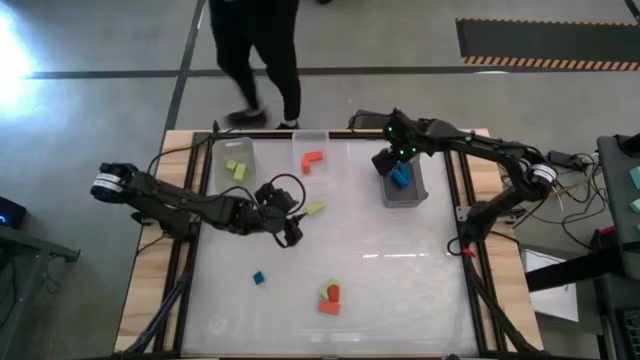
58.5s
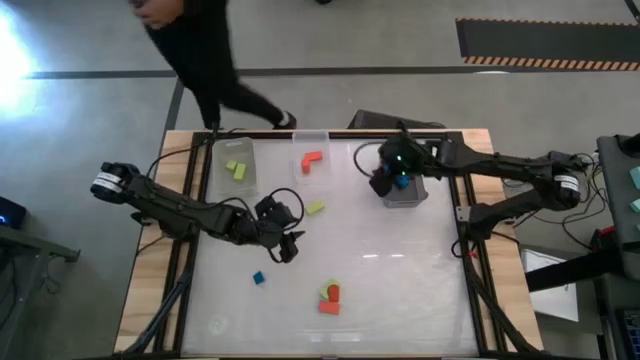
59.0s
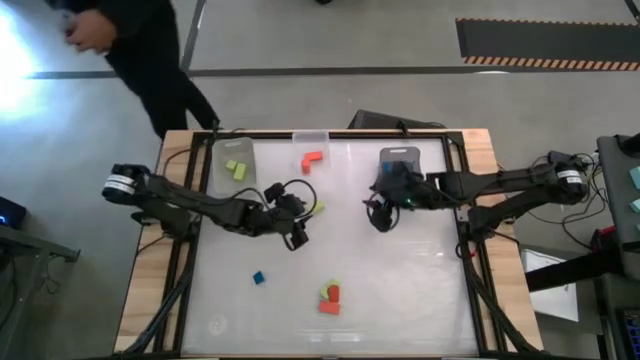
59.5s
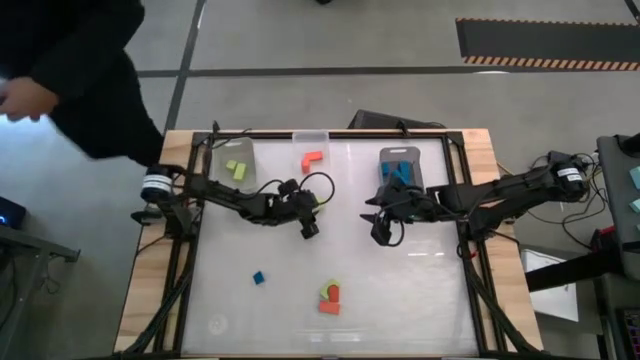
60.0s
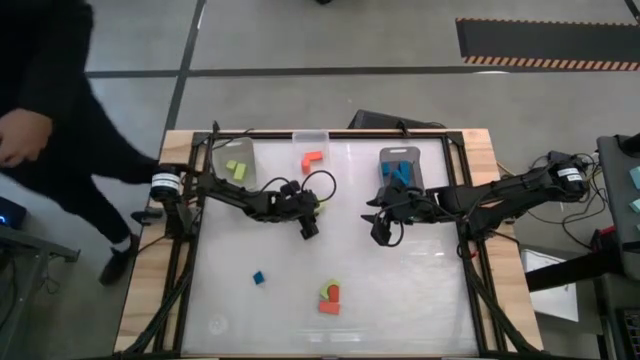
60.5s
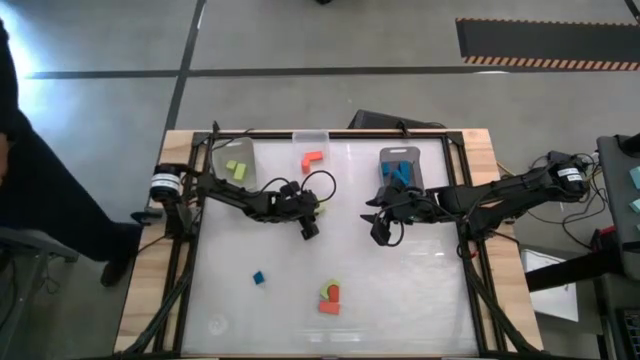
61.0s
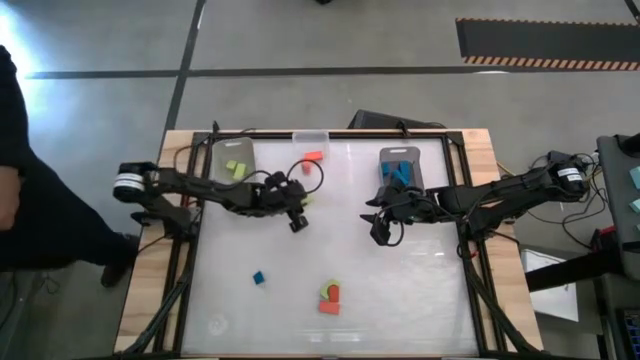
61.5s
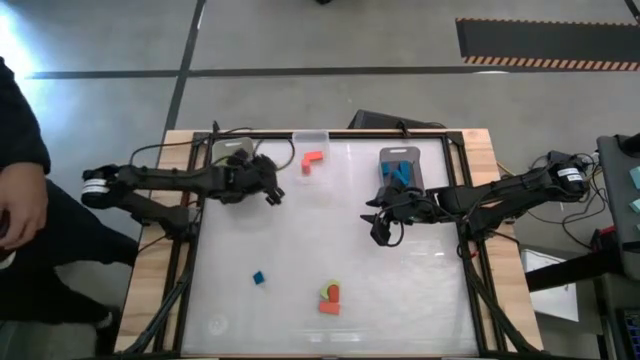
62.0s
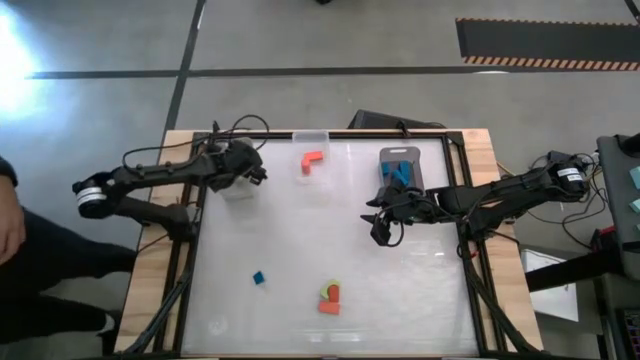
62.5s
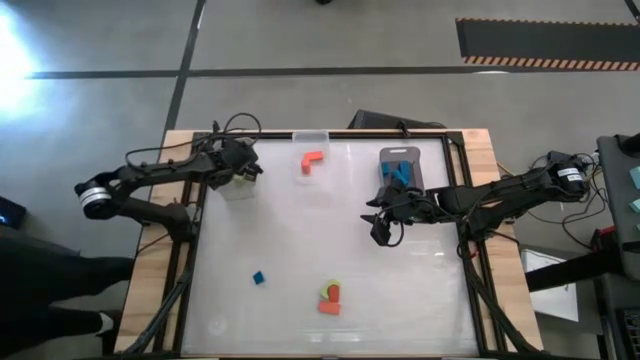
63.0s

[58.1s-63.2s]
Task: Sort & place blocks by color
Put the green block into the white bin

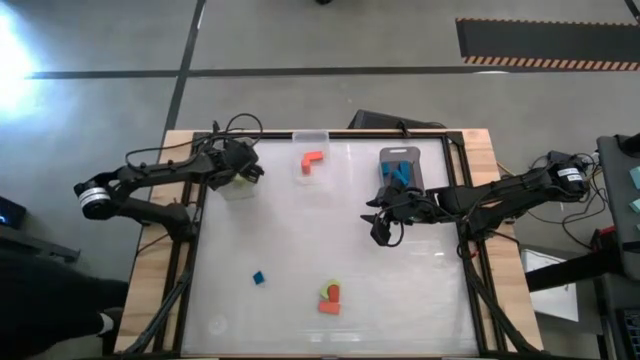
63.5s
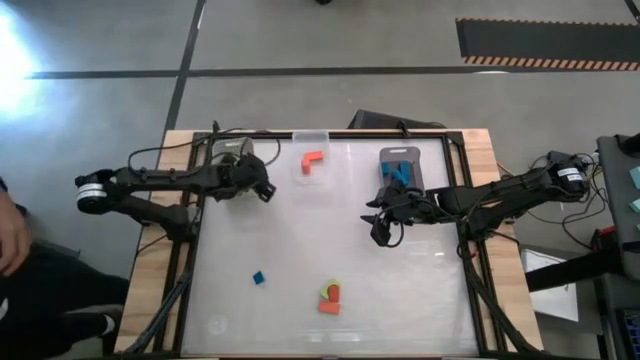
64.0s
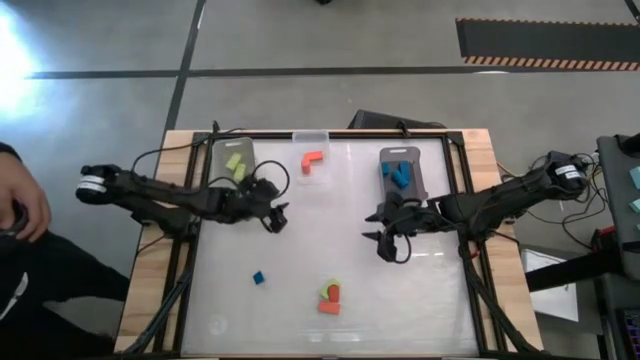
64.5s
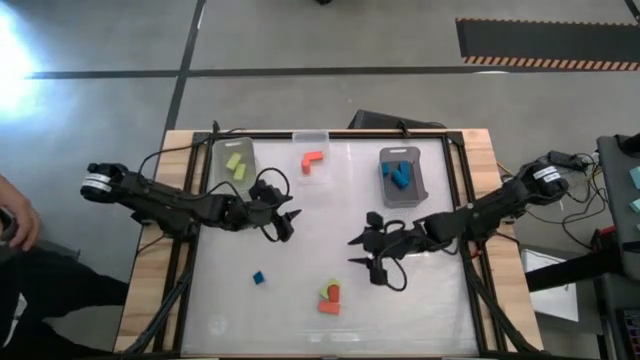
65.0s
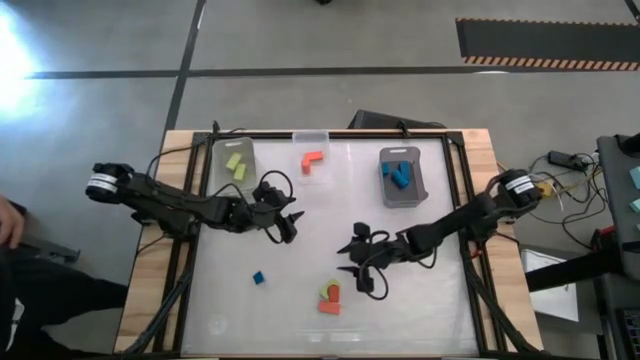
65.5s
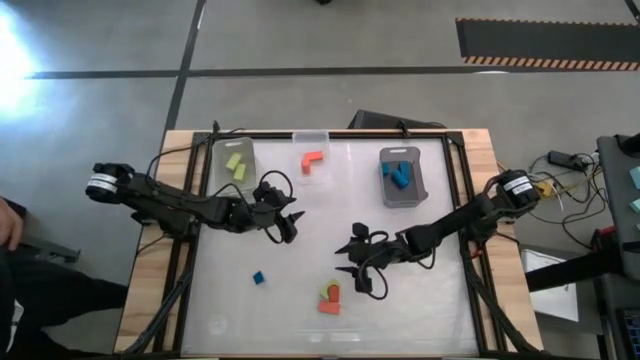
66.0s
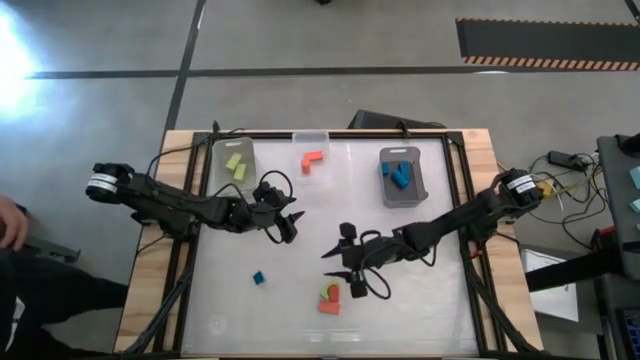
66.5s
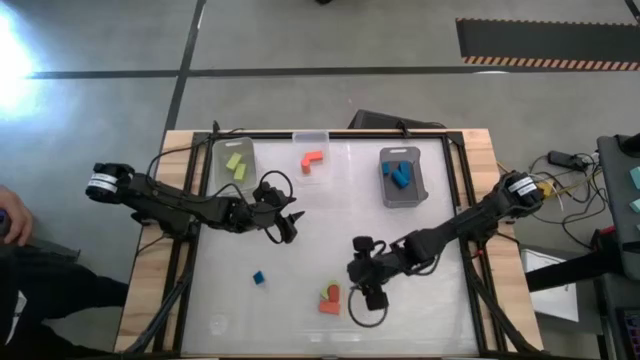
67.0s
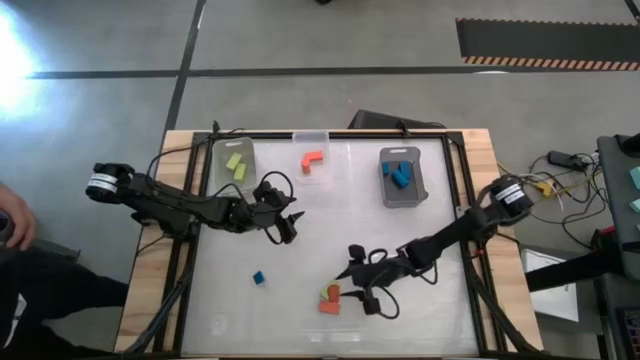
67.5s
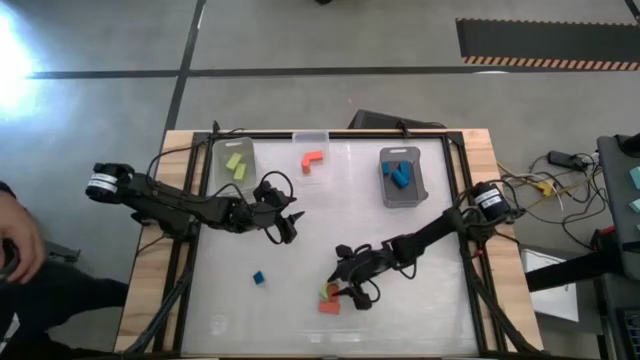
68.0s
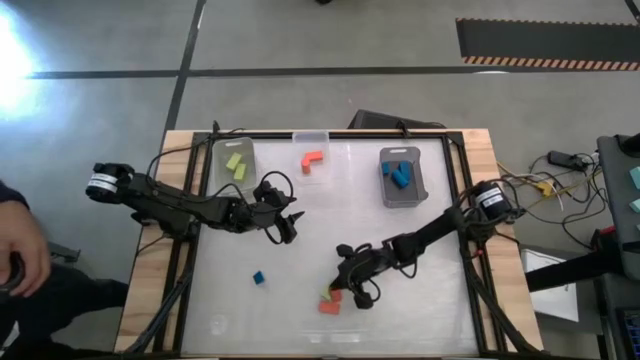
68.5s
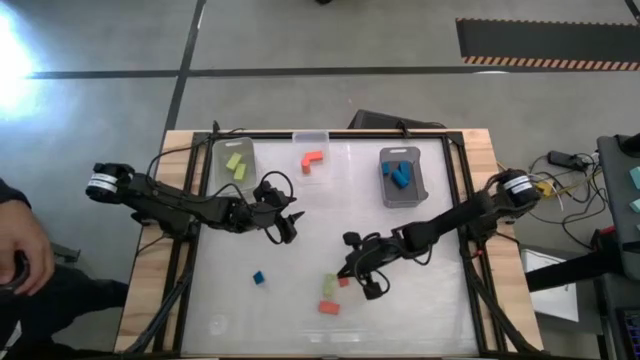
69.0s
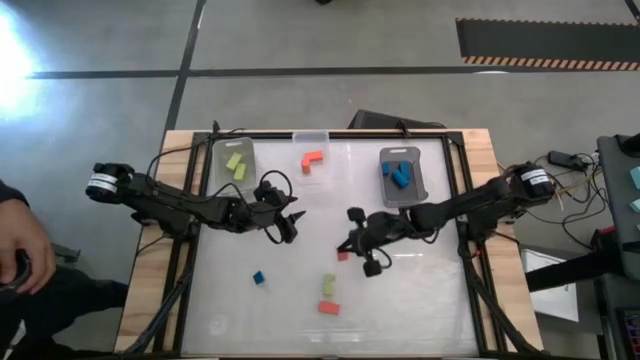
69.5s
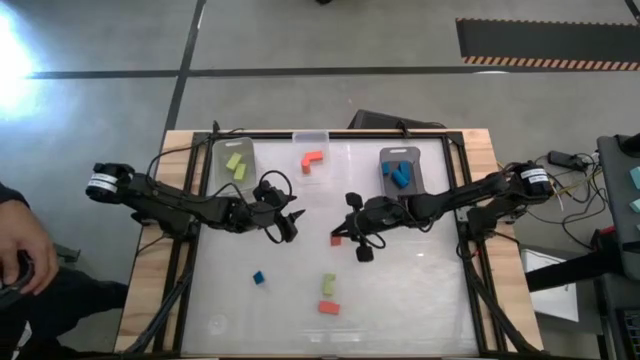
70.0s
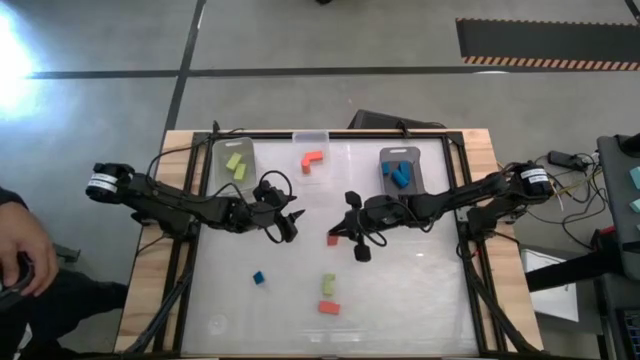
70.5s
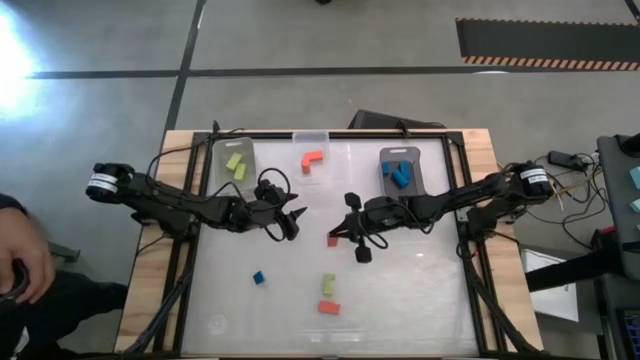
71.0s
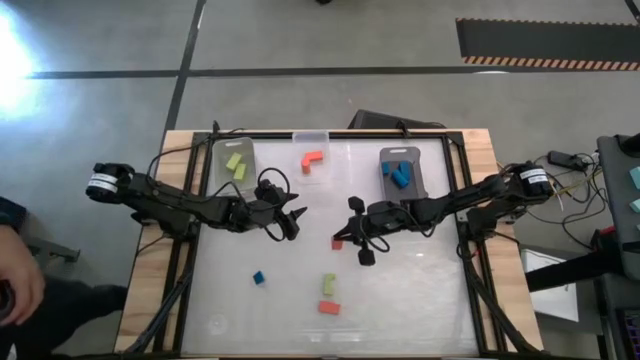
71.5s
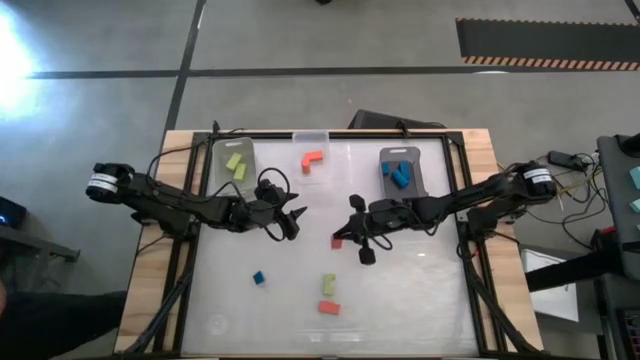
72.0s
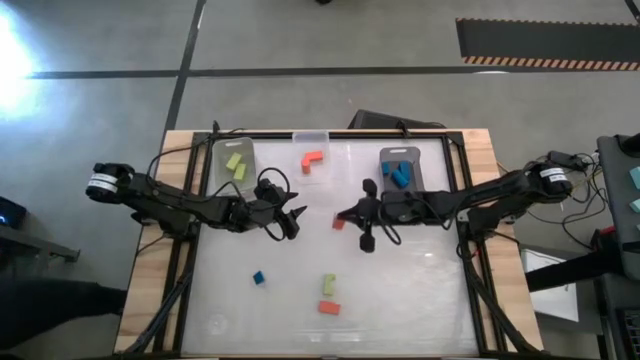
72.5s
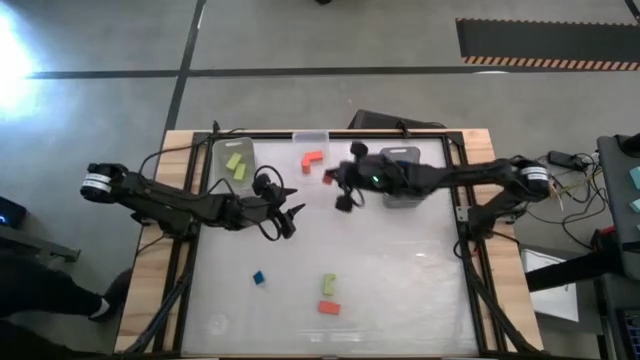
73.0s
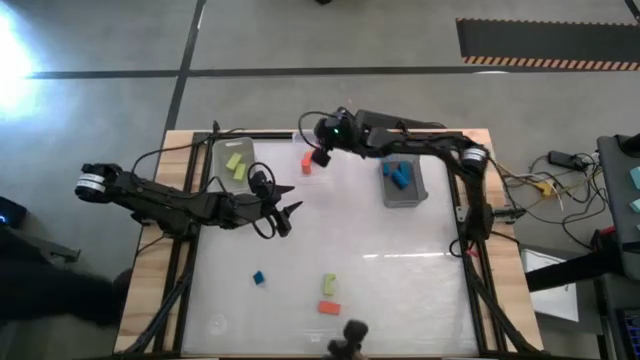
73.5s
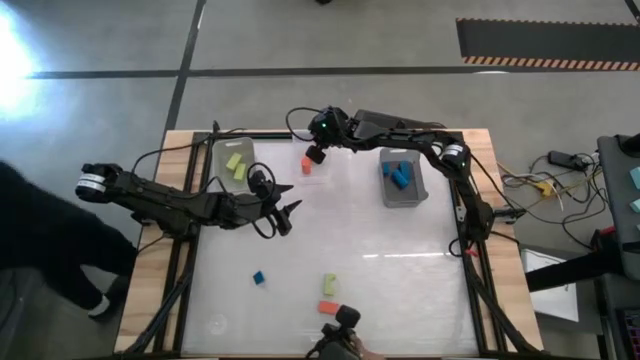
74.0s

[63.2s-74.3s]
Put the orange block into the transparent bin

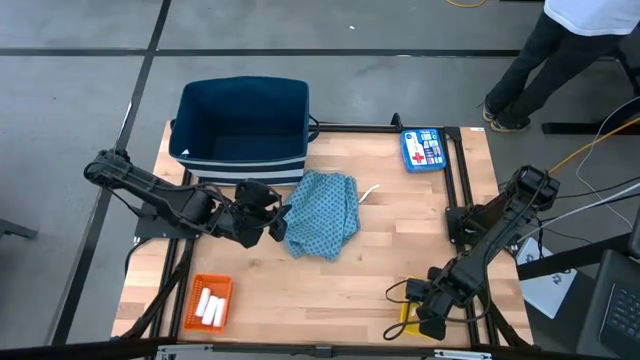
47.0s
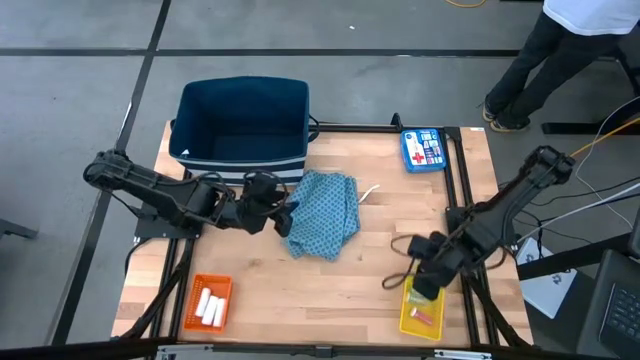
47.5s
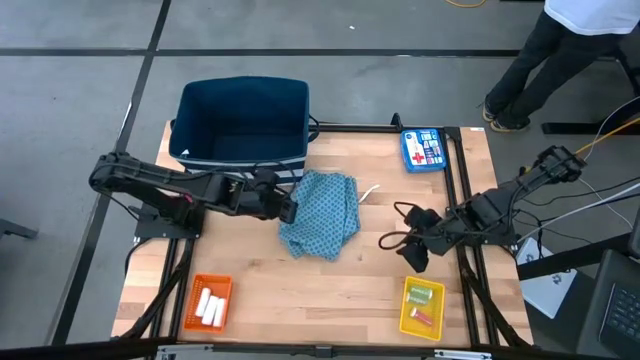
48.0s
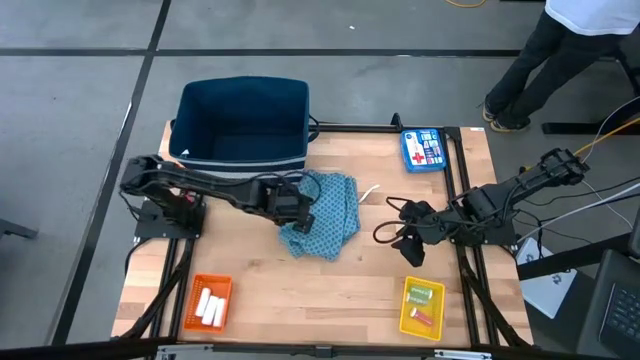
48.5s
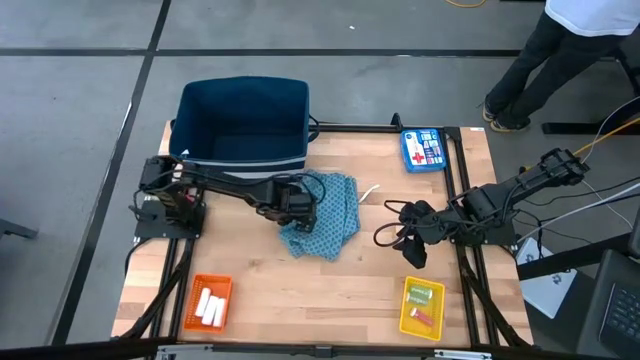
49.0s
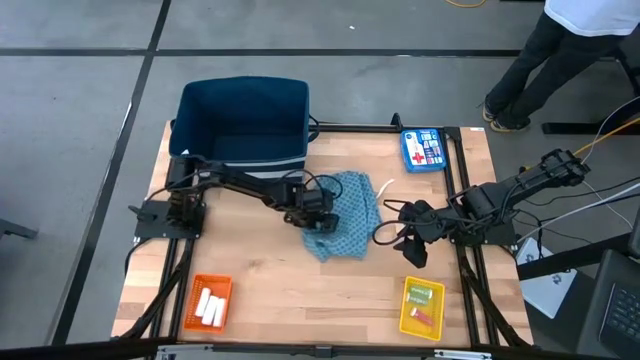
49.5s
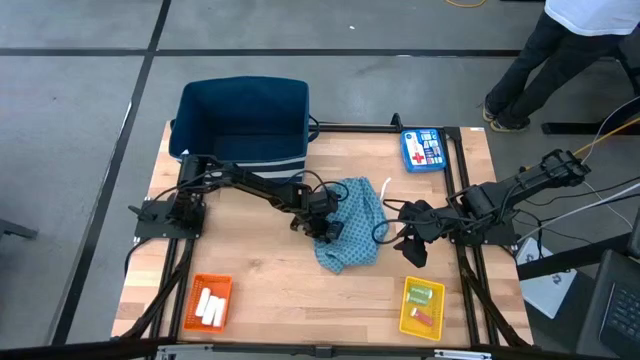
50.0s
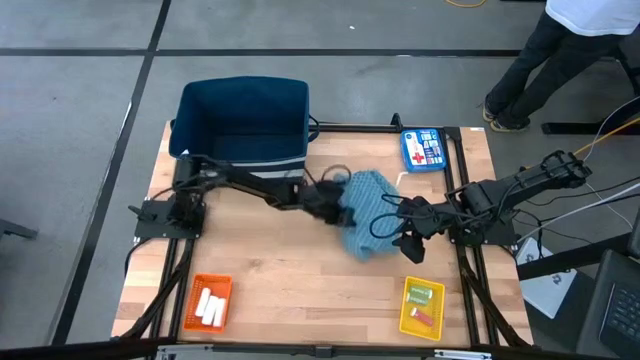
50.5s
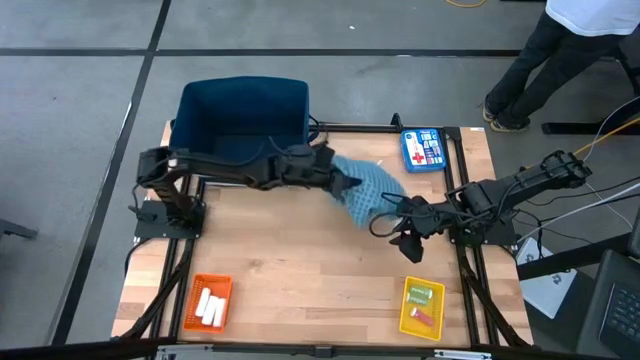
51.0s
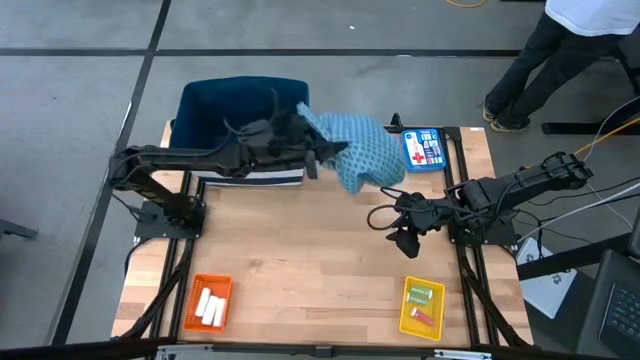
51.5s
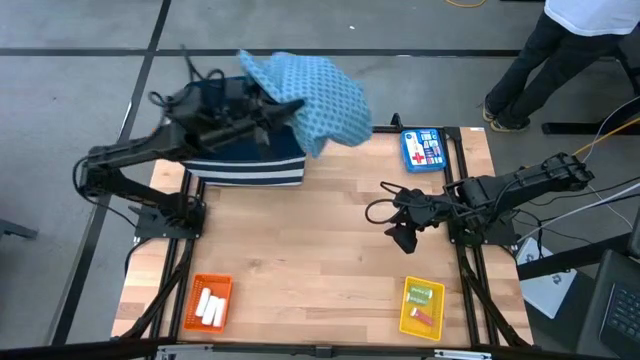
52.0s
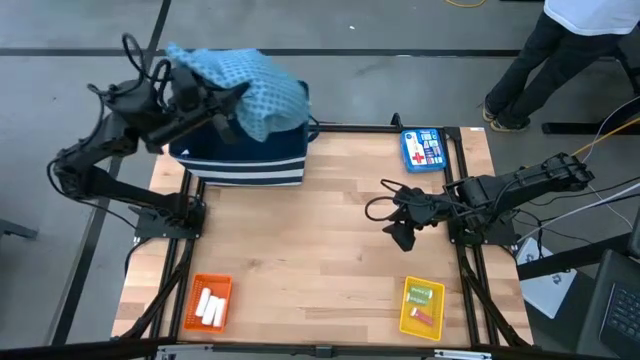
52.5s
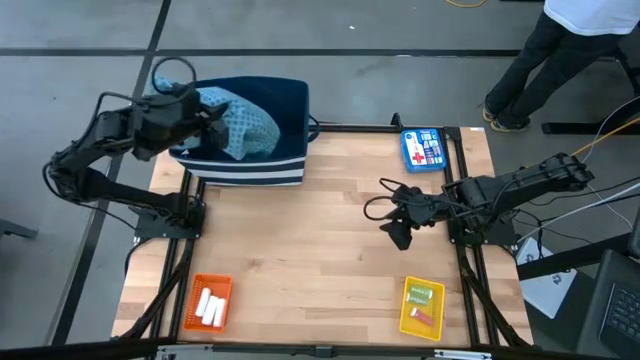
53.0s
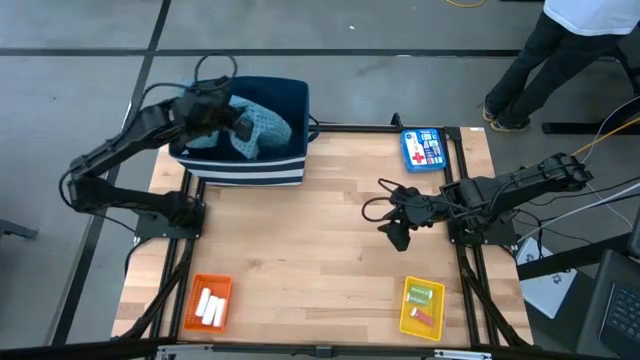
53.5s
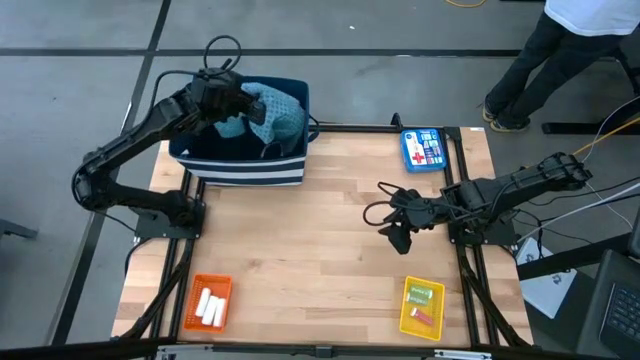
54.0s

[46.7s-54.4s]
Task: Pick & Place Medicine items
Put the blue patient gown into the blue laundry bin
